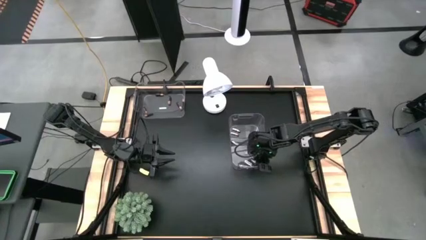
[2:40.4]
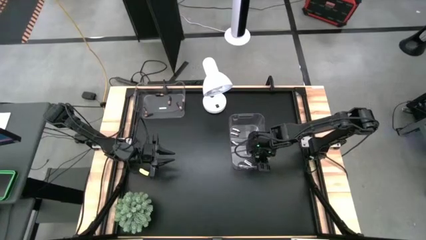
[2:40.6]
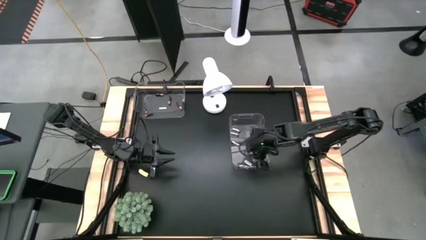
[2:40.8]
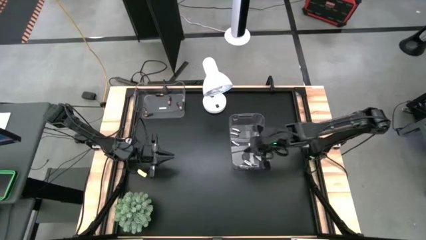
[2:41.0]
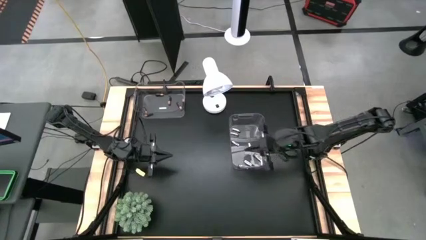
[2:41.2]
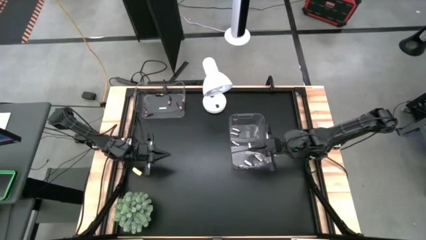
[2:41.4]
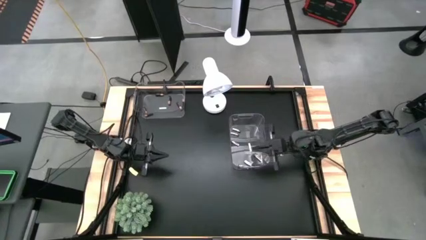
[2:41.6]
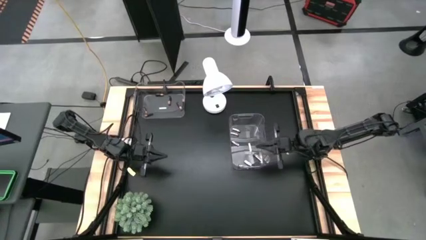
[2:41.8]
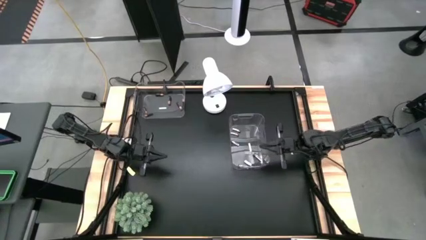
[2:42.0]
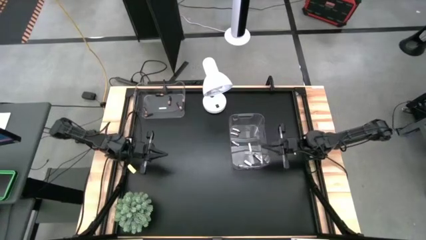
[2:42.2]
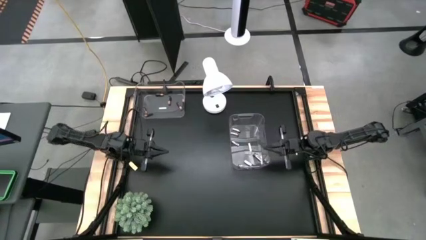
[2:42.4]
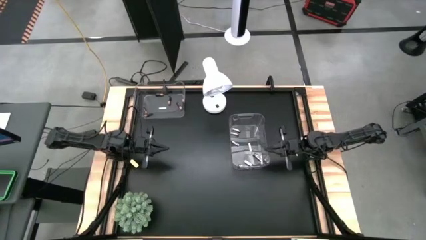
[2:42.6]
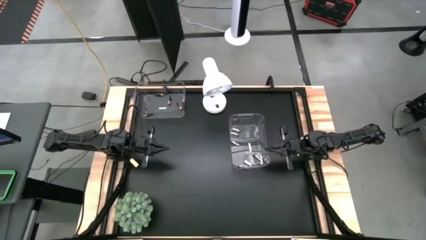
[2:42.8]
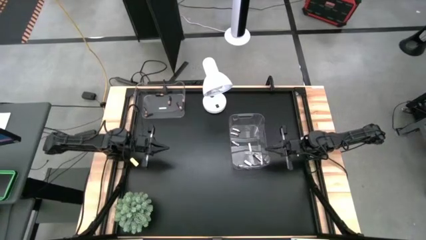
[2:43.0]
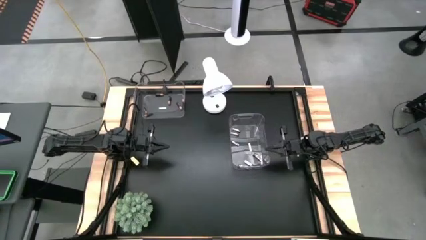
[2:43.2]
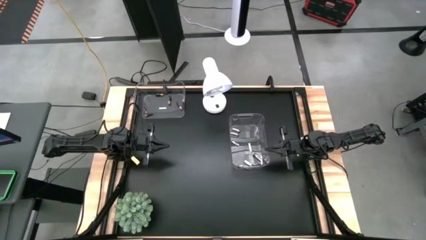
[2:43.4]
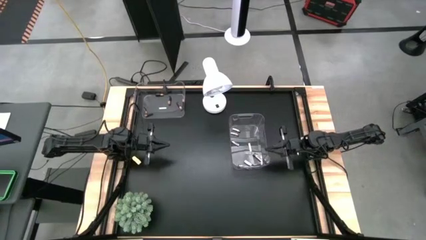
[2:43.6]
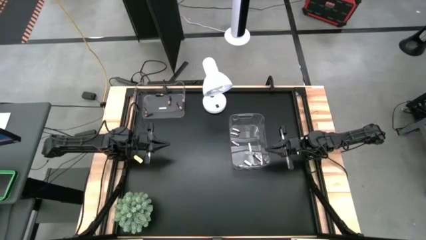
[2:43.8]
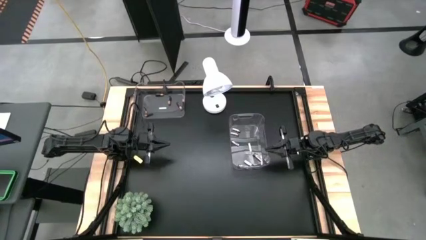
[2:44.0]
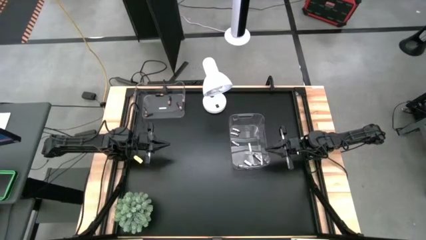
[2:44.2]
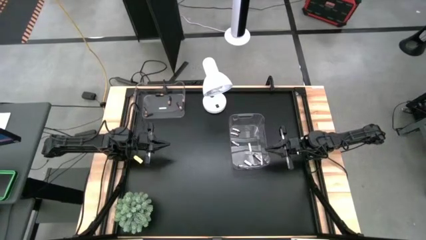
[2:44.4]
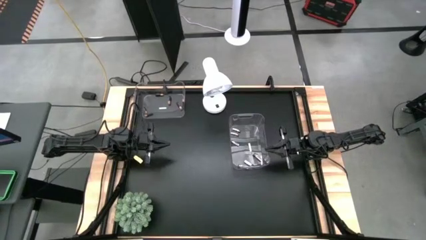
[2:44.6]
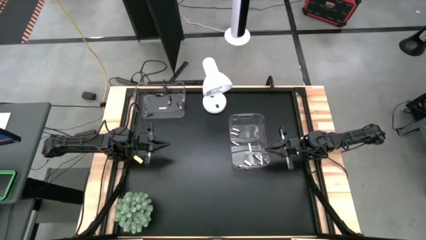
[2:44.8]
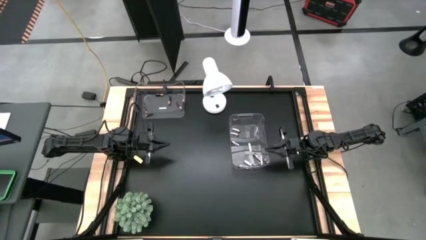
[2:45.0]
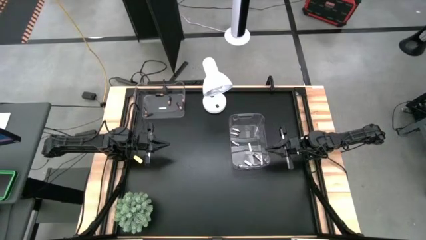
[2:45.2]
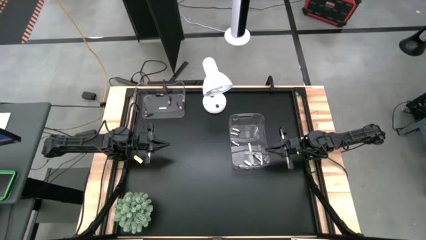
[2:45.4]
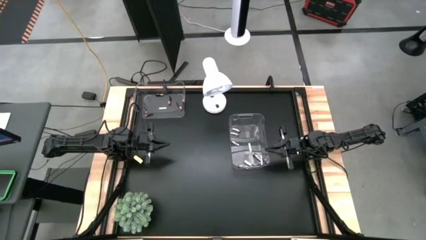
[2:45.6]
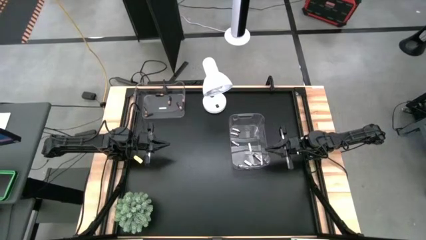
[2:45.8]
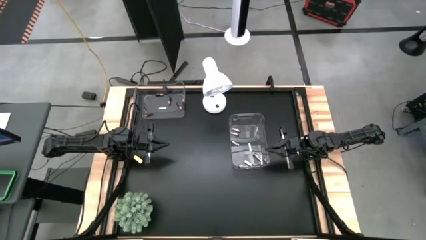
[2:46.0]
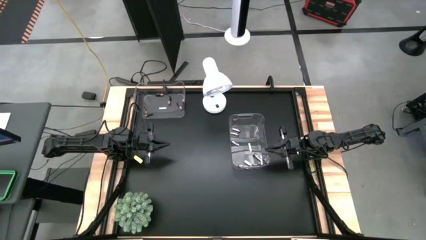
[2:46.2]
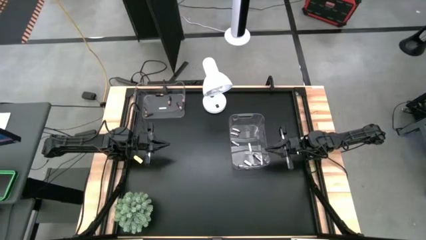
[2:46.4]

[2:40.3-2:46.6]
Task: Sort batteries
Return to Home Position
